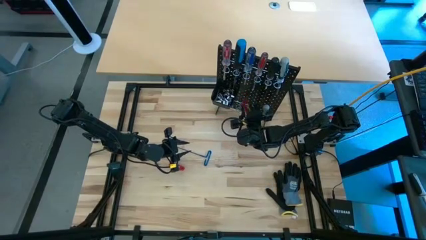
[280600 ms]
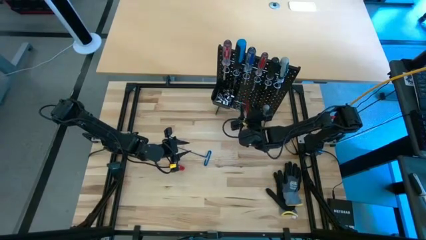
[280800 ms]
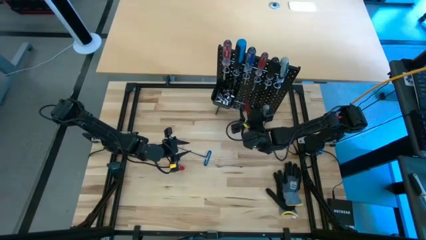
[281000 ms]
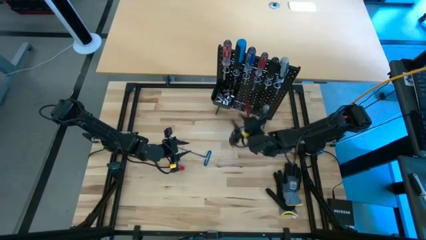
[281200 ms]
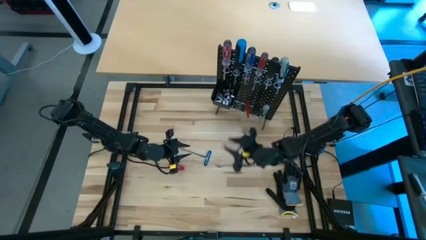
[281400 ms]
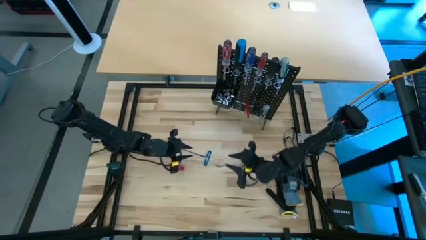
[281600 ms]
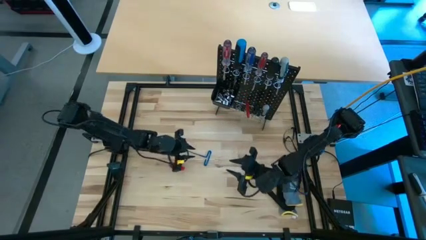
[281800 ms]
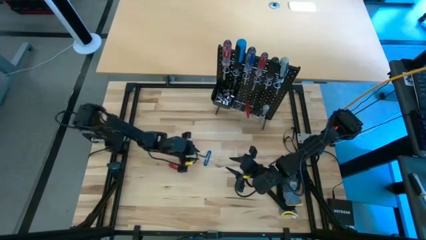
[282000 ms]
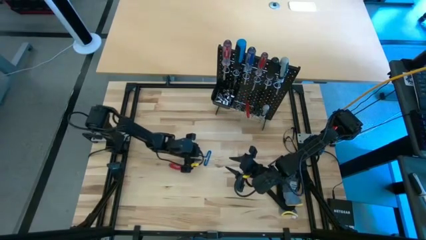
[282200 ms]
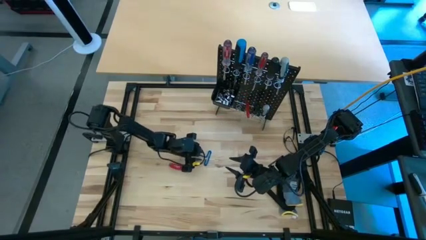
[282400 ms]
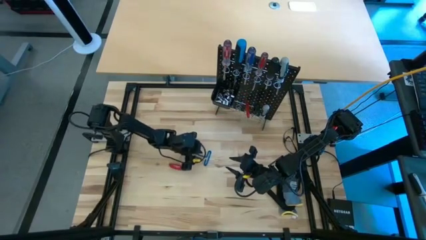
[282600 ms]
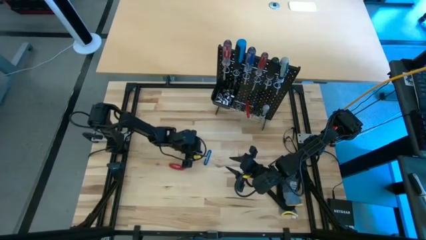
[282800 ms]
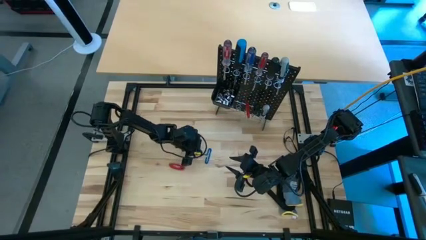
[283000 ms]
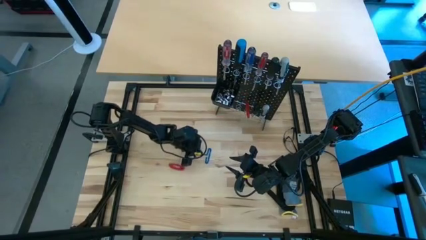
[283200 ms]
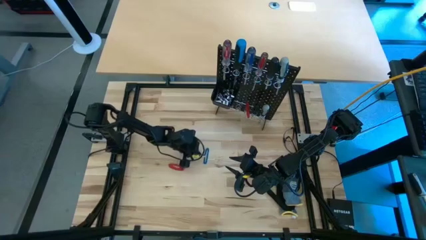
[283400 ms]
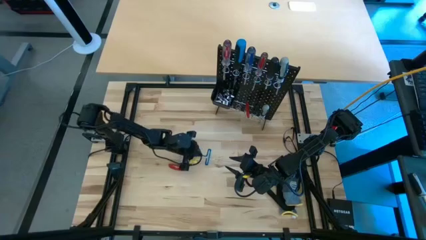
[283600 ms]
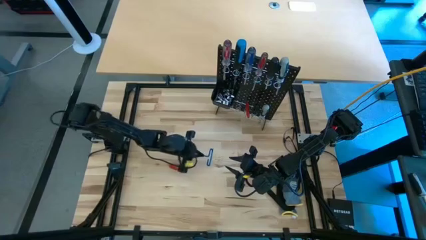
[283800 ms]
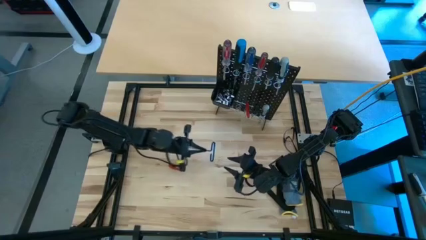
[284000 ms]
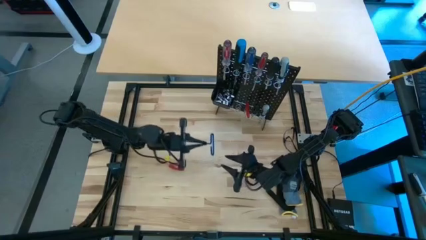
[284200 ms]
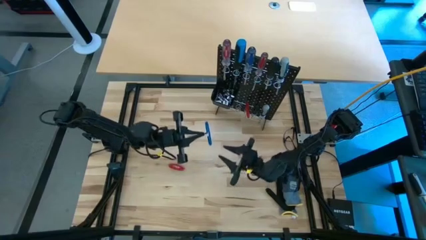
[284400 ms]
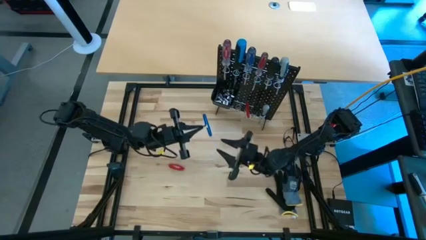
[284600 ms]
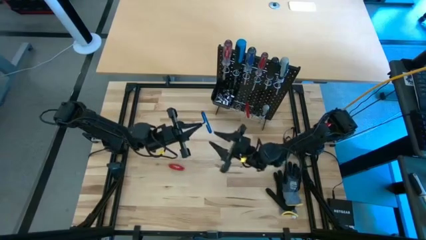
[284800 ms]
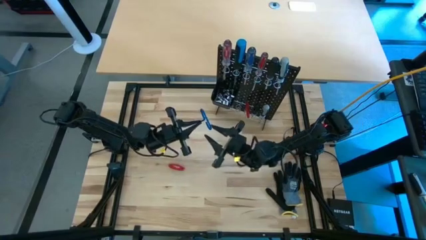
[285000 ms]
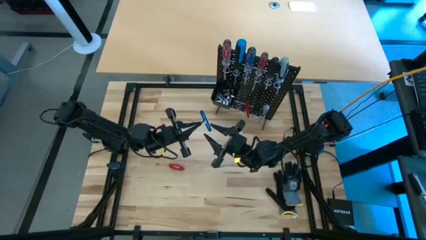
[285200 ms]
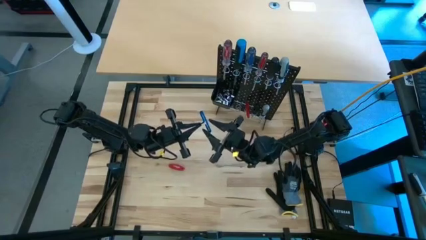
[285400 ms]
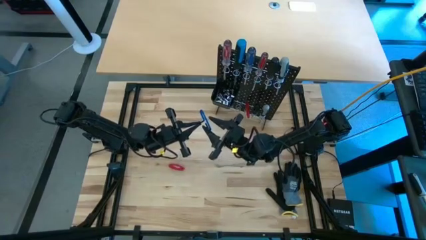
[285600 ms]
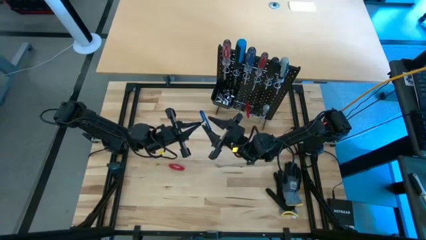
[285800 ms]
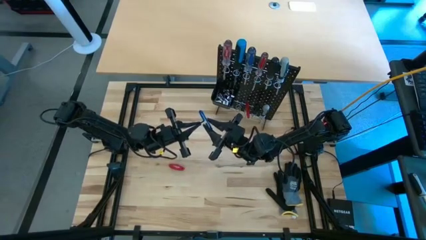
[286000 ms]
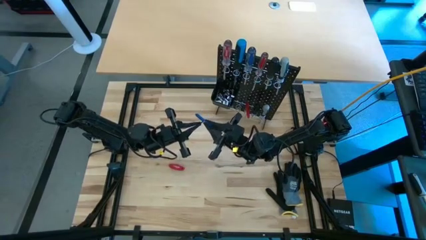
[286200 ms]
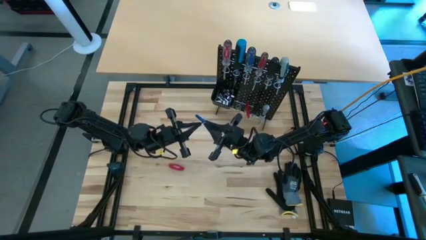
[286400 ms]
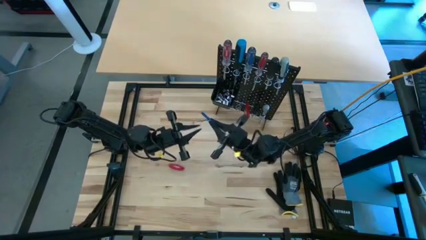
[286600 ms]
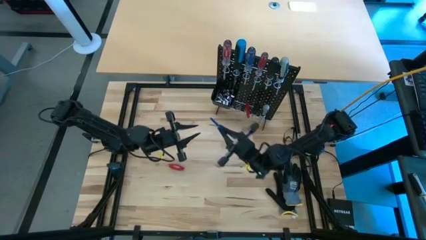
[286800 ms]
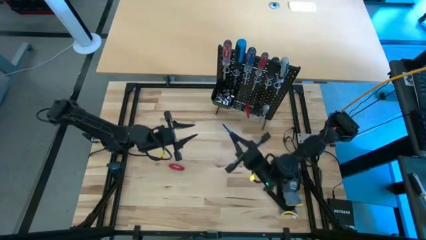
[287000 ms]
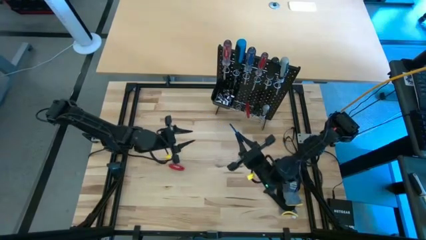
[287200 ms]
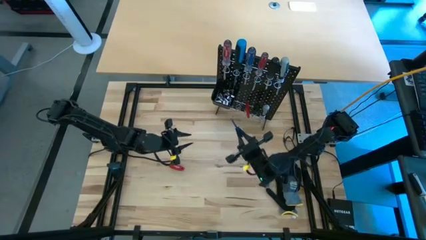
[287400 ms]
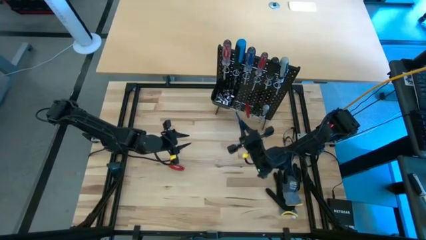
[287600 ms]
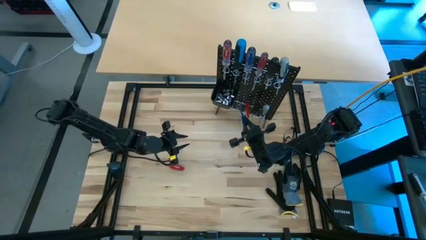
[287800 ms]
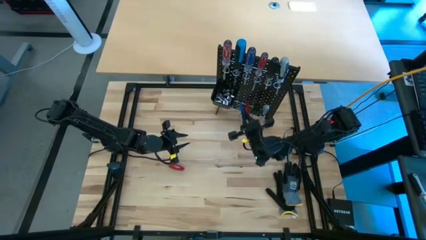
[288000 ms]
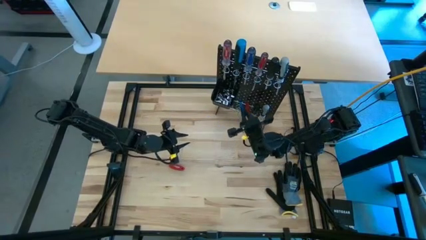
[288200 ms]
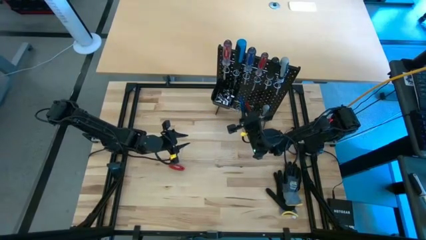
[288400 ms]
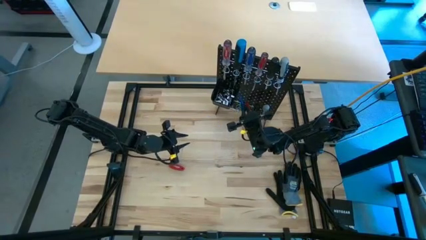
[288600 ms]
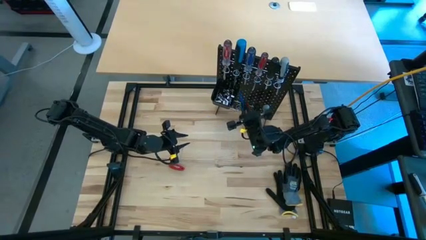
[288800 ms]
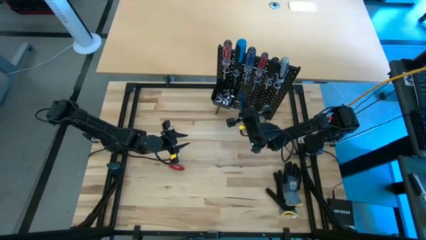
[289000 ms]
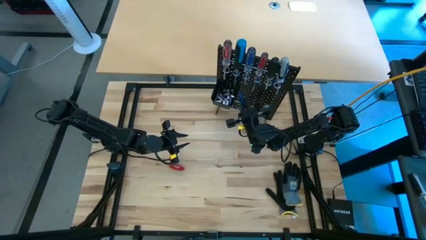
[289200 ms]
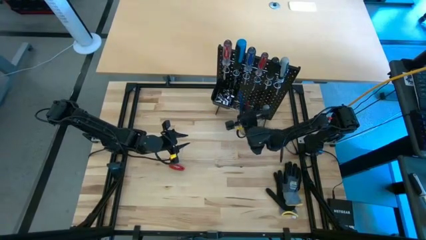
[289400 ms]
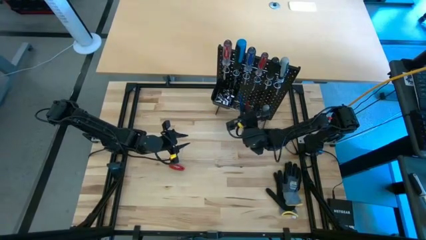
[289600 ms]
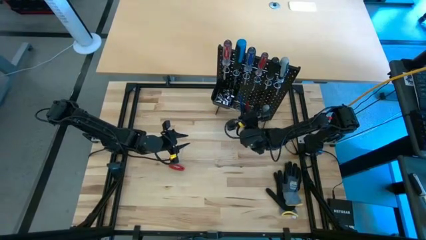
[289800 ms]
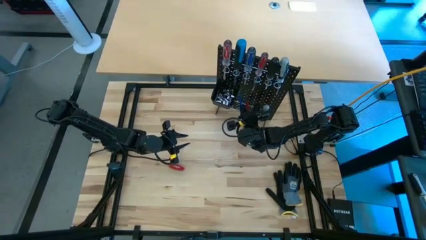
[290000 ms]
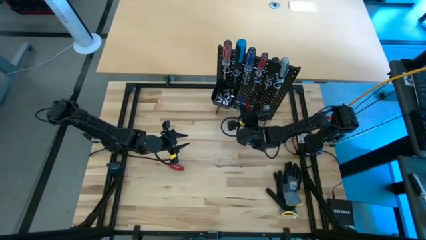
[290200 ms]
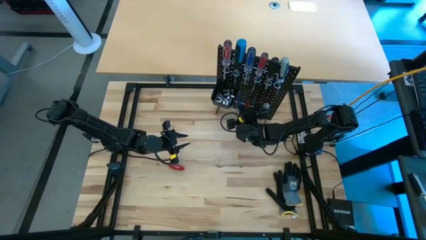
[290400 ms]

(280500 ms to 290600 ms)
Task: Hang tools onto peg board
Hang the blue pick tool on the black pegboard

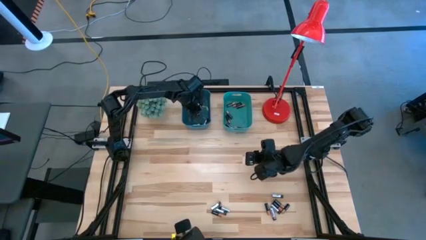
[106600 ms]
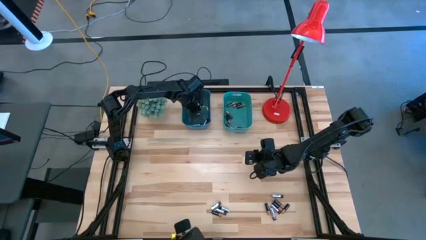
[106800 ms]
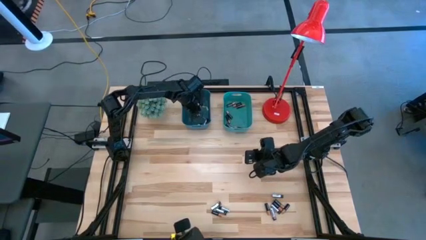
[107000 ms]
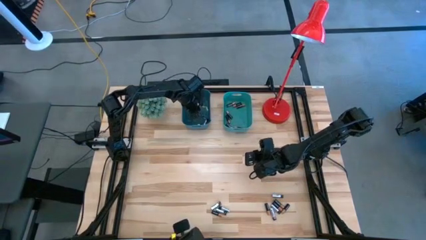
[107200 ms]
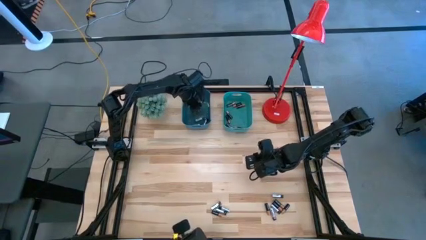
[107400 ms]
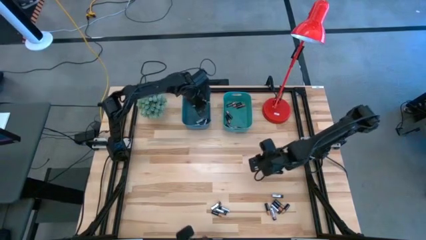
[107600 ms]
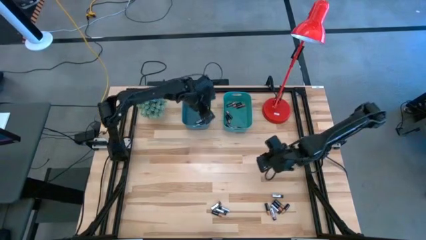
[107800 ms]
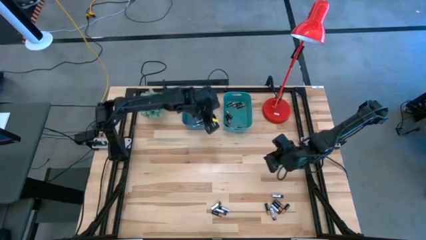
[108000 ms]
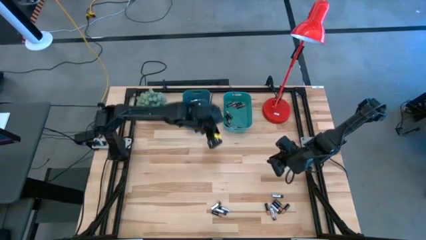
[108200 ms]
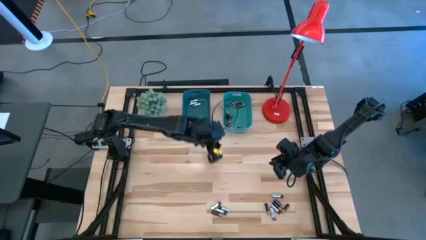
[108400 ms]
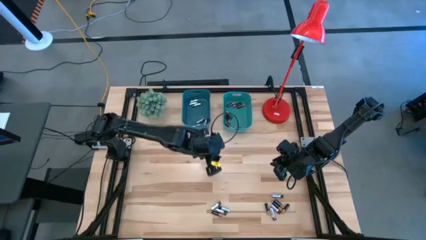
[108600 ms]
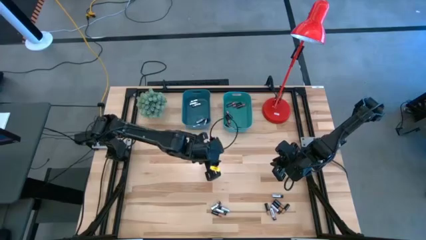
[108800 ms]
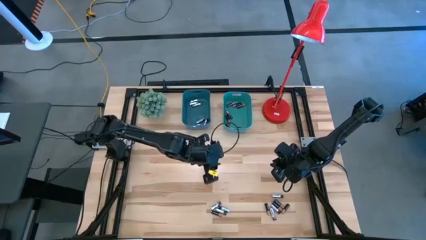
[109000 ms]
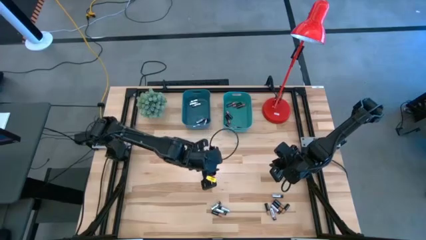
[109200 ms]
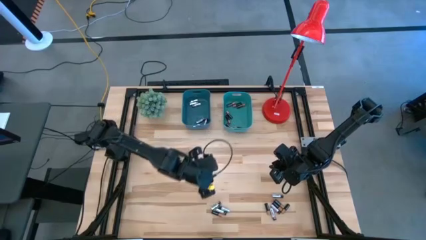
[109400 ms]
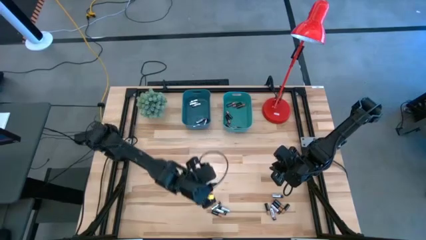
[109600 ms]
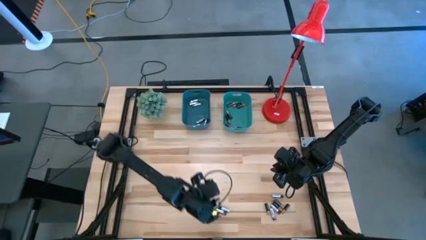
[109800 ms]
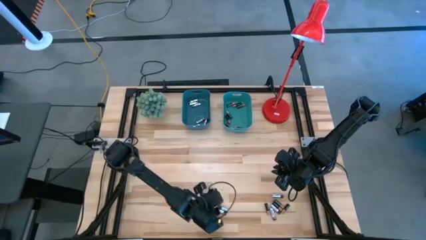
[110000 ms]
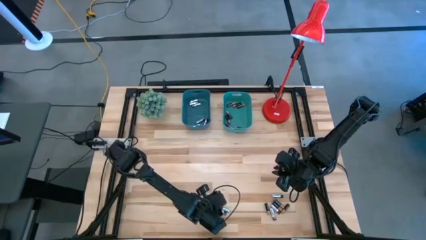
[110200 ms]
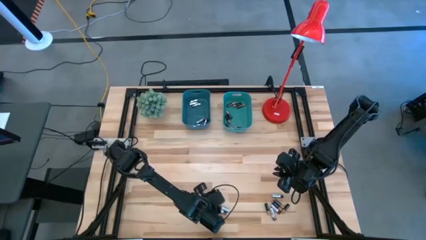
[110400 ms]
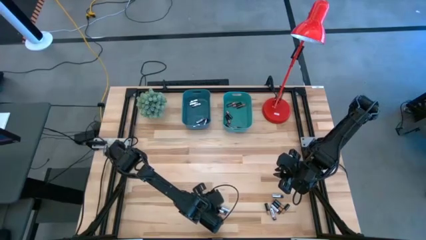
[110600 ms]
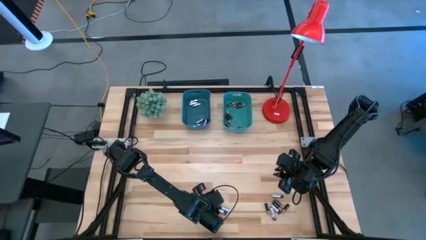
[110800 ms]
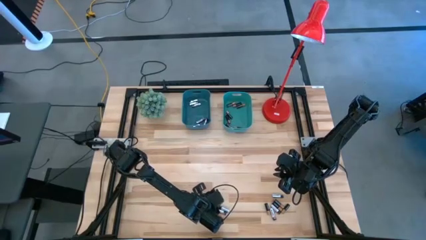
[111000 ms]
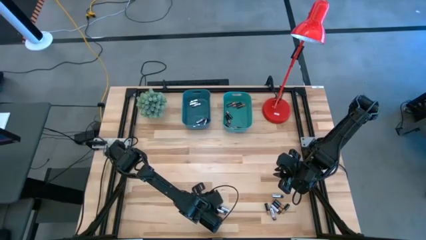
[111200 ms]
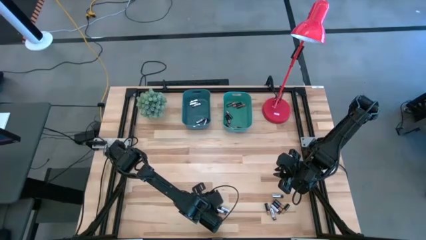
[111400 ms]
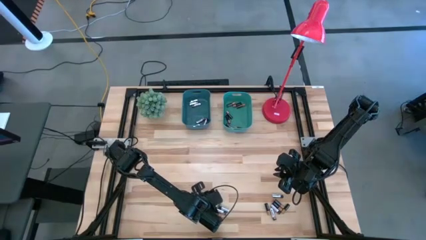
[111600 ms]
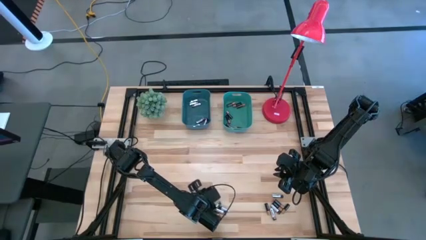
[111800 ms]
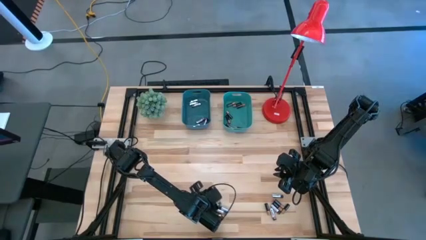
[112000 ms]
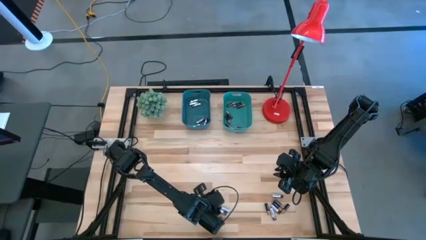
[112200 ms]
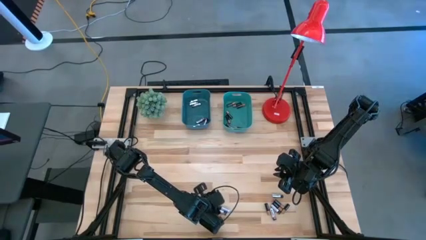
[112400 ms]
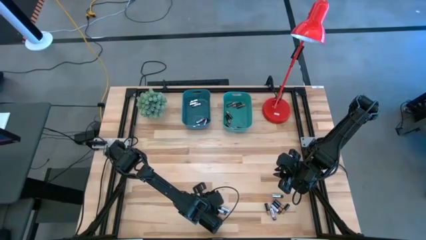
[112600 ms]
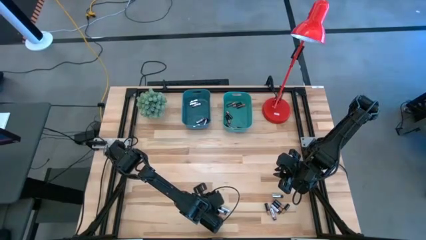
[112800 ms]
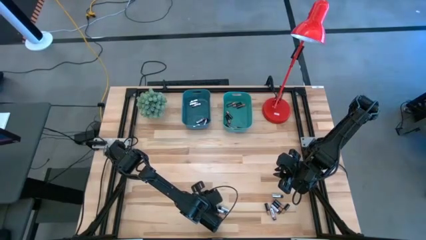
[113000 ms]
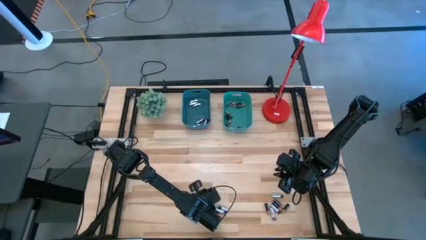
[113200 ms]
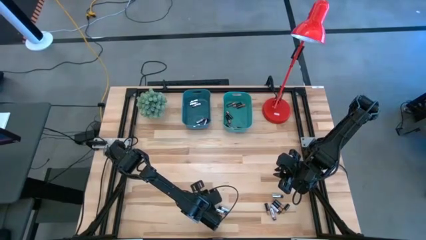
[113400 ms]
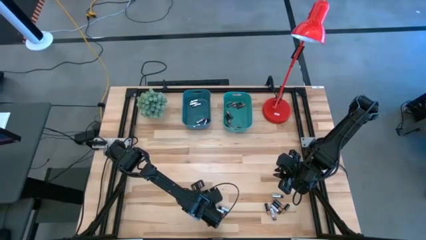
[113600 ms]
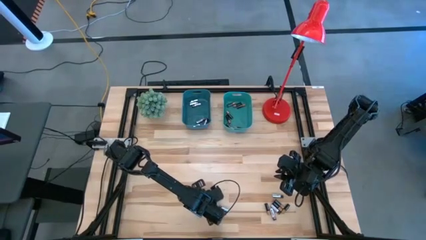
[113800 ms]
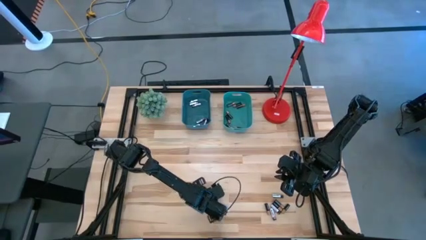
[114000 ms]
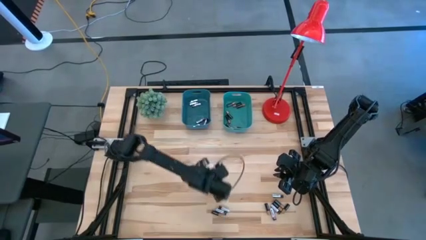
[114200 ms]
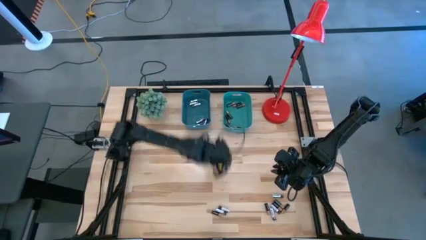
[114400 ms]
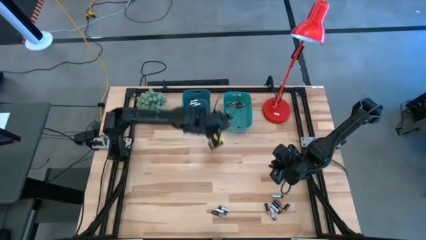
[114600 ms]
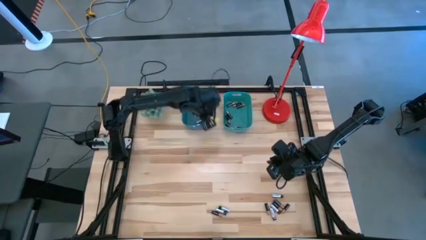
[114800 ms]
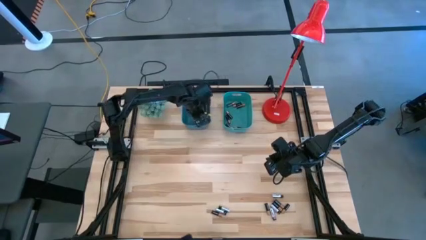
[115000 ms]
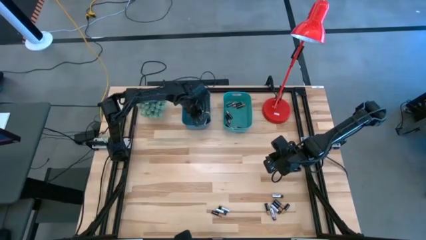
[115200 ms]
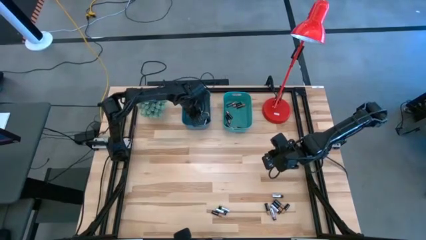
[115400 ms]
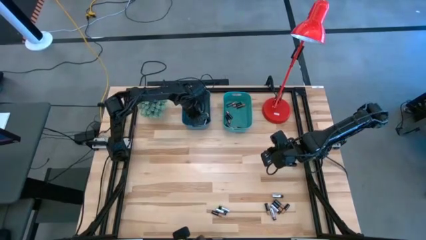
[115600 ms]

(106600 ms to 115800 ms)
Task: Sort batteries
Put the silver battery into the blue bin
